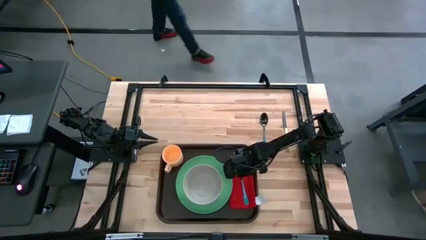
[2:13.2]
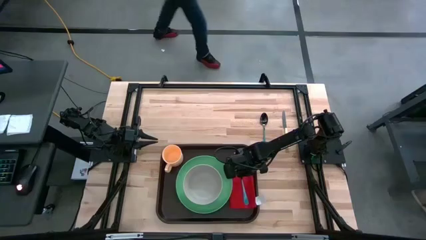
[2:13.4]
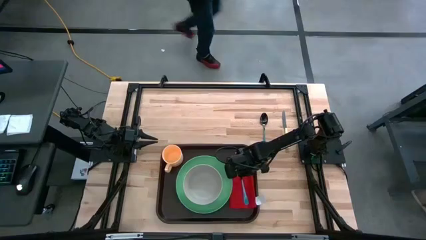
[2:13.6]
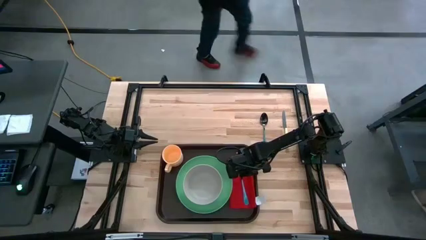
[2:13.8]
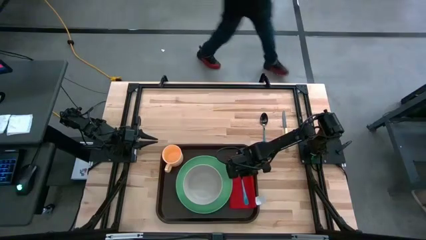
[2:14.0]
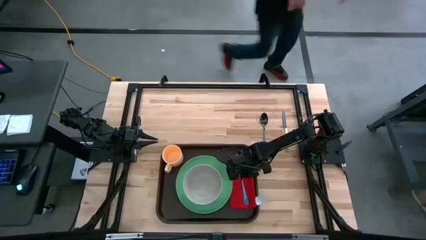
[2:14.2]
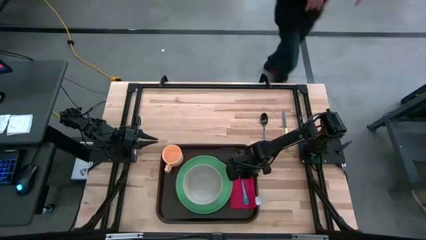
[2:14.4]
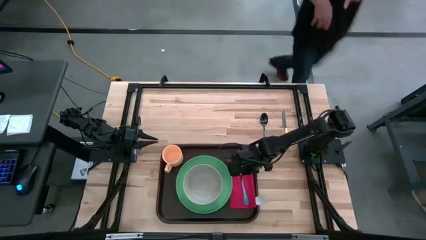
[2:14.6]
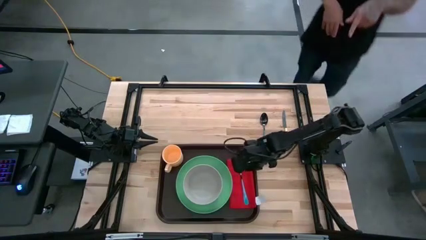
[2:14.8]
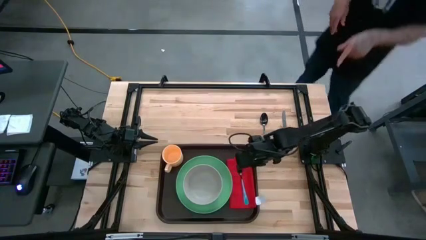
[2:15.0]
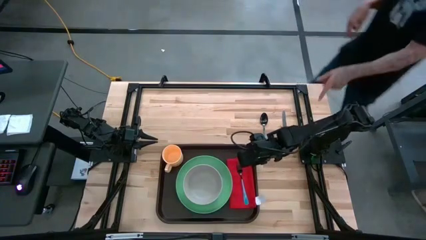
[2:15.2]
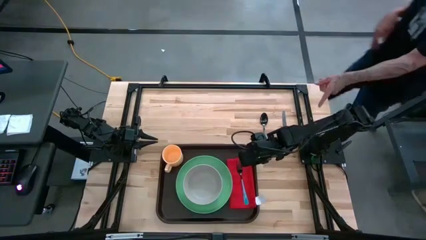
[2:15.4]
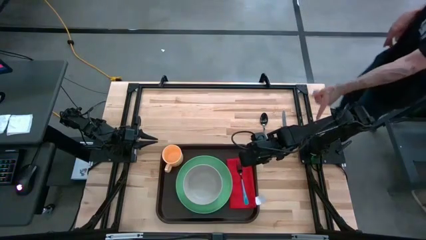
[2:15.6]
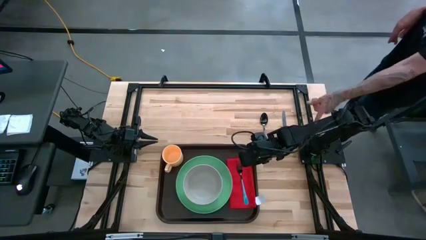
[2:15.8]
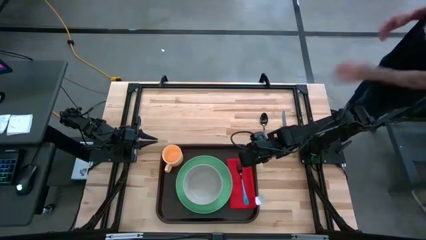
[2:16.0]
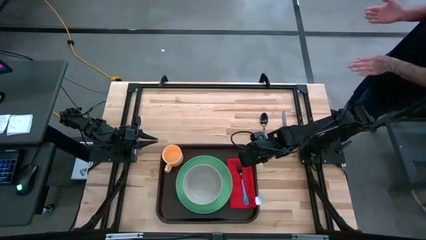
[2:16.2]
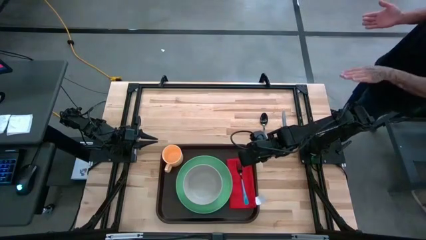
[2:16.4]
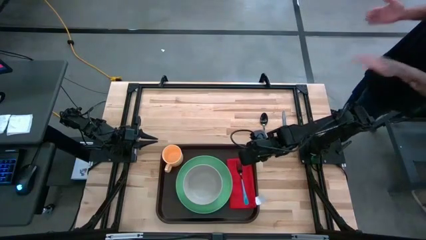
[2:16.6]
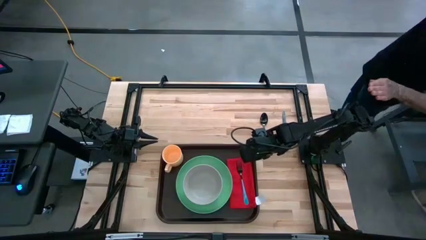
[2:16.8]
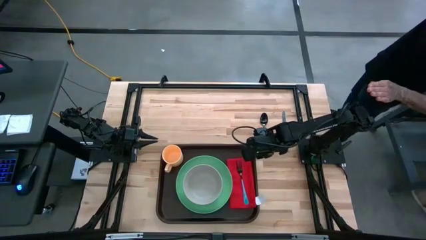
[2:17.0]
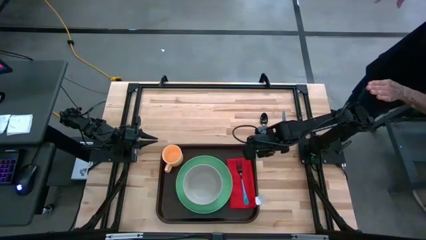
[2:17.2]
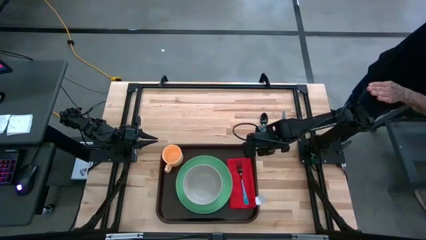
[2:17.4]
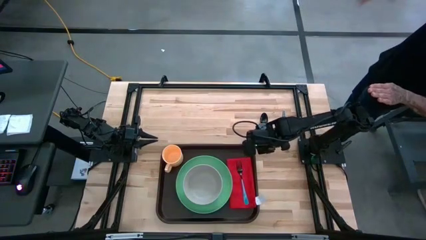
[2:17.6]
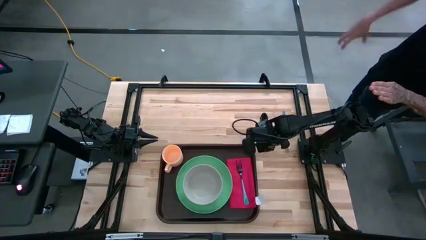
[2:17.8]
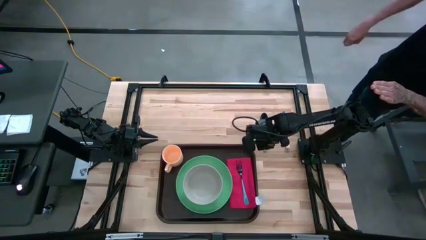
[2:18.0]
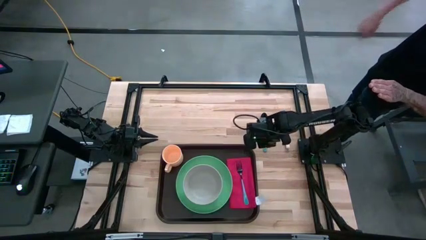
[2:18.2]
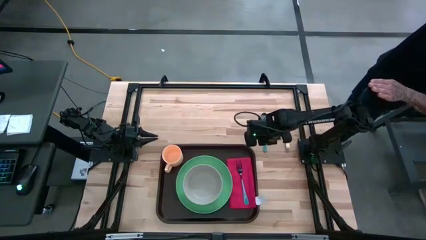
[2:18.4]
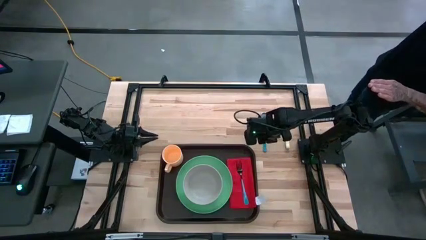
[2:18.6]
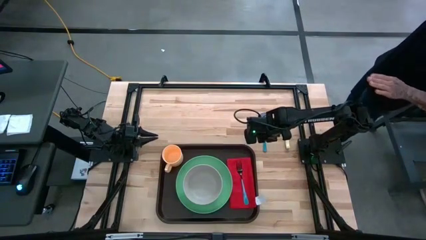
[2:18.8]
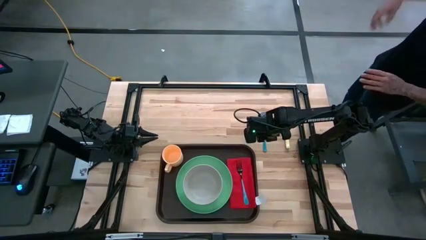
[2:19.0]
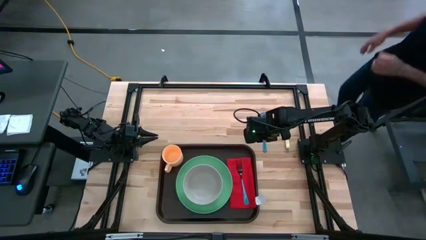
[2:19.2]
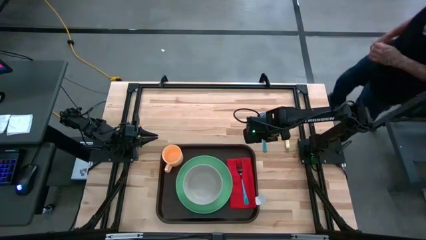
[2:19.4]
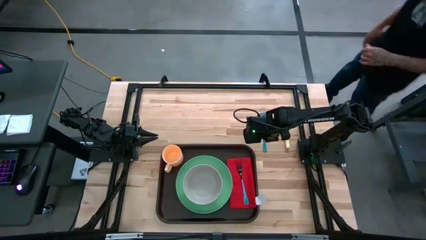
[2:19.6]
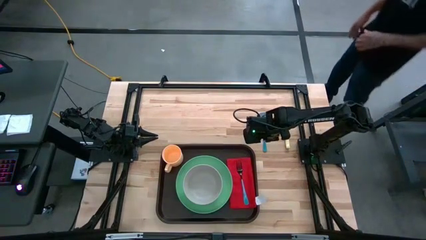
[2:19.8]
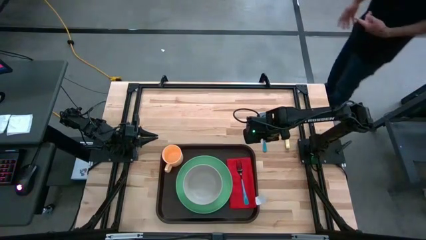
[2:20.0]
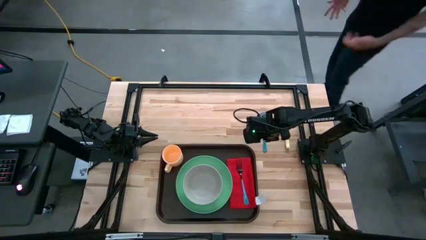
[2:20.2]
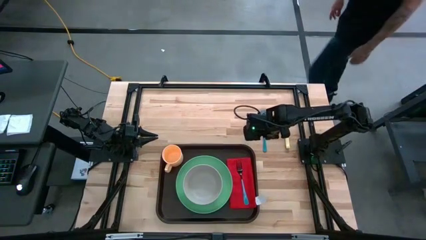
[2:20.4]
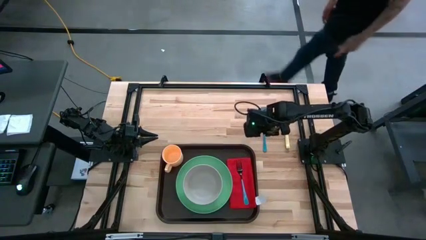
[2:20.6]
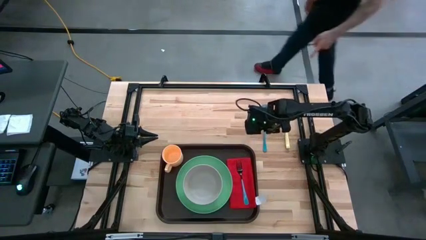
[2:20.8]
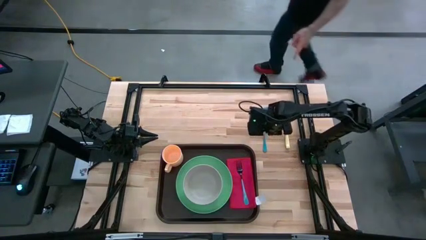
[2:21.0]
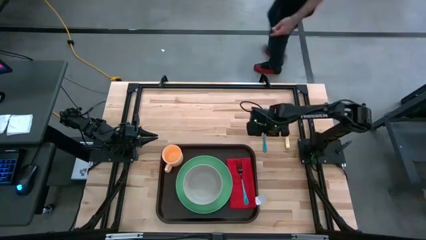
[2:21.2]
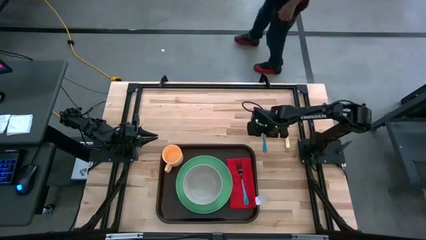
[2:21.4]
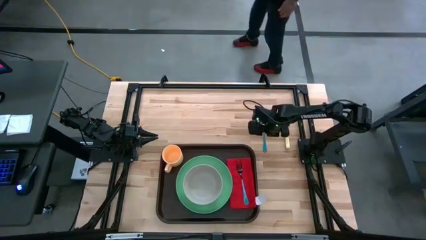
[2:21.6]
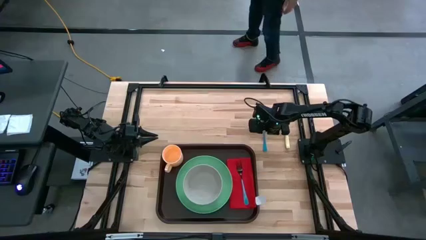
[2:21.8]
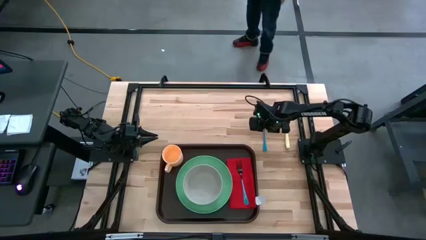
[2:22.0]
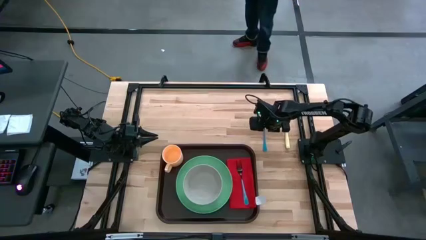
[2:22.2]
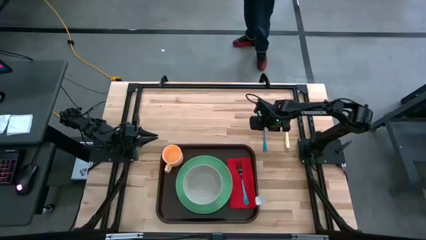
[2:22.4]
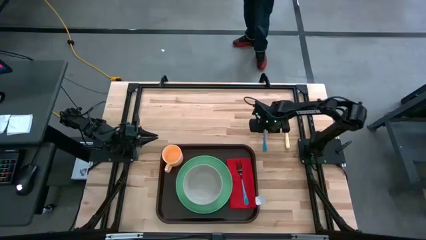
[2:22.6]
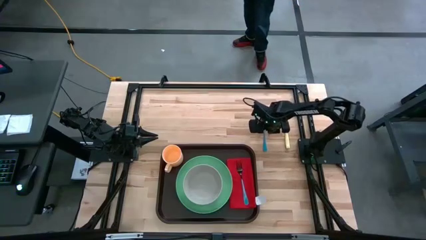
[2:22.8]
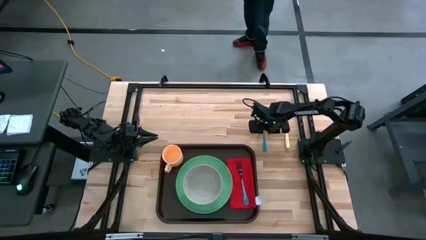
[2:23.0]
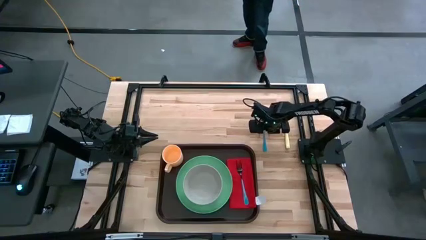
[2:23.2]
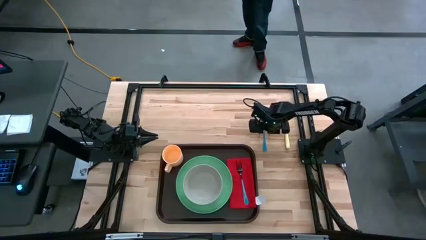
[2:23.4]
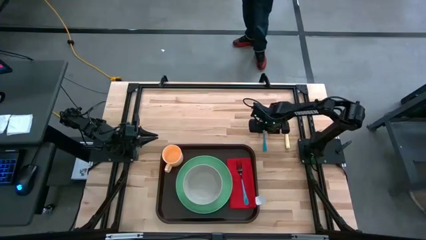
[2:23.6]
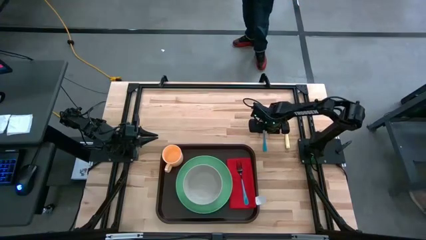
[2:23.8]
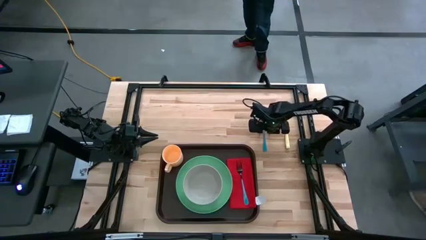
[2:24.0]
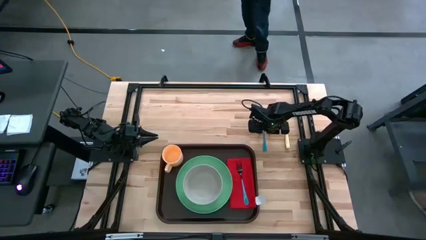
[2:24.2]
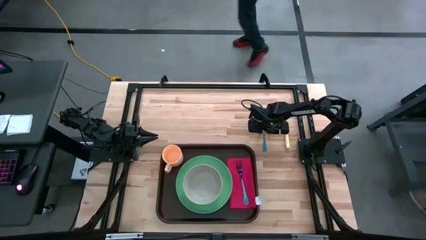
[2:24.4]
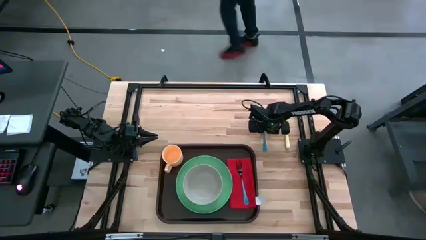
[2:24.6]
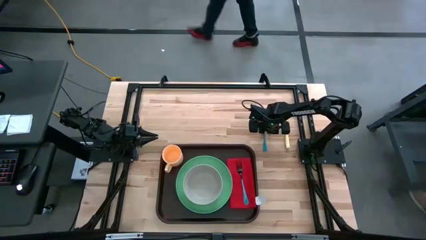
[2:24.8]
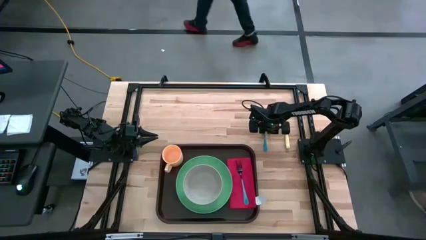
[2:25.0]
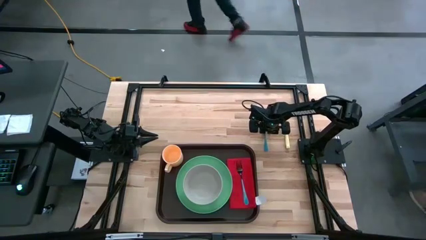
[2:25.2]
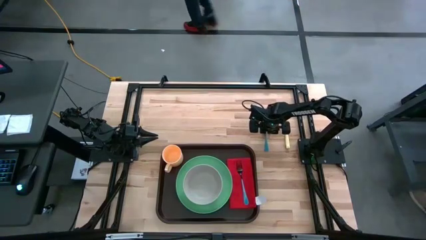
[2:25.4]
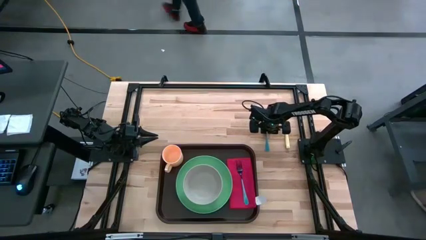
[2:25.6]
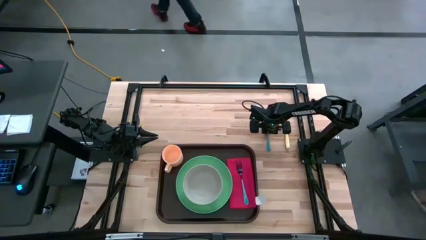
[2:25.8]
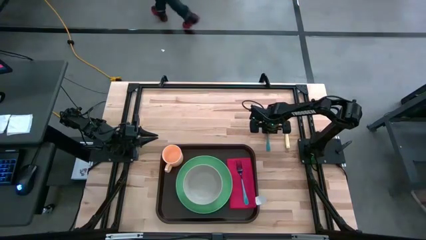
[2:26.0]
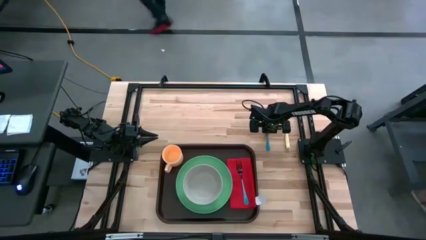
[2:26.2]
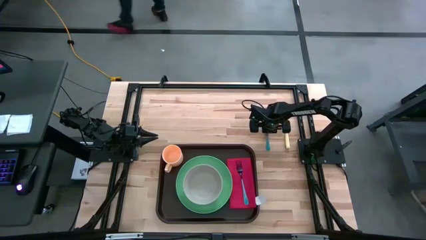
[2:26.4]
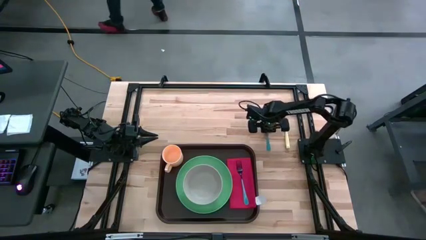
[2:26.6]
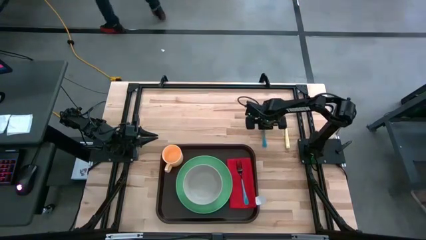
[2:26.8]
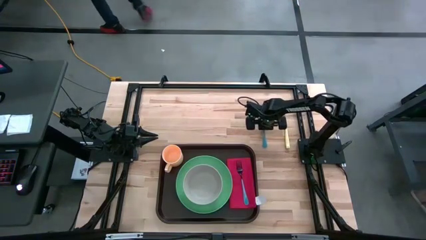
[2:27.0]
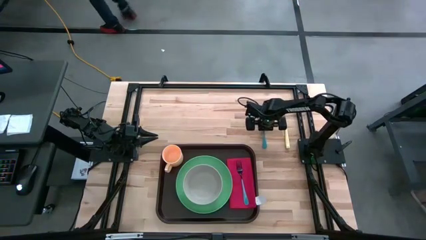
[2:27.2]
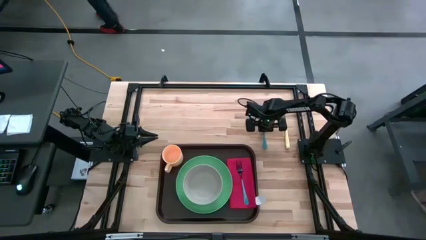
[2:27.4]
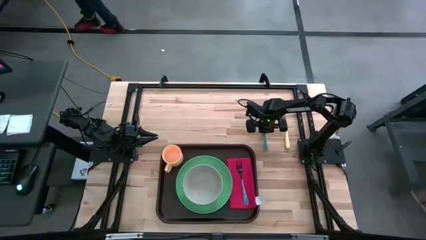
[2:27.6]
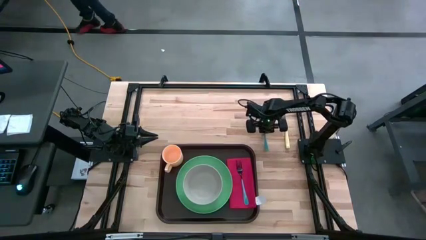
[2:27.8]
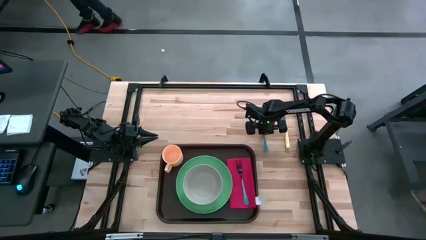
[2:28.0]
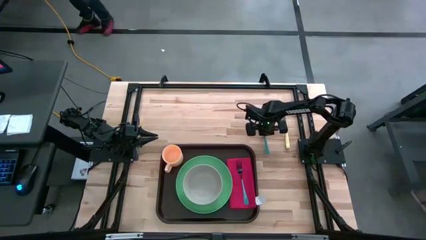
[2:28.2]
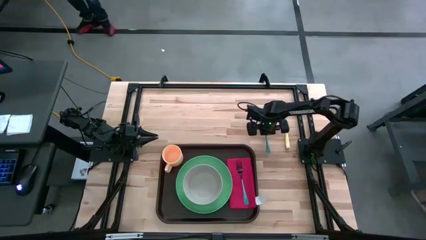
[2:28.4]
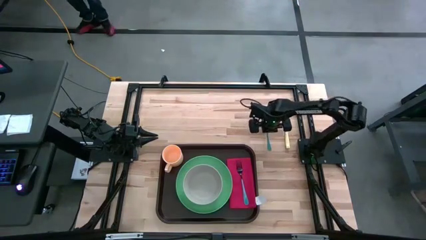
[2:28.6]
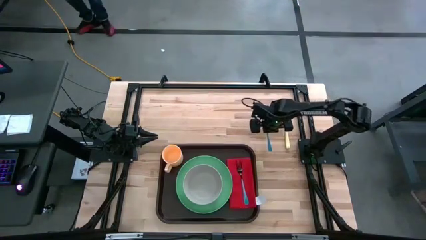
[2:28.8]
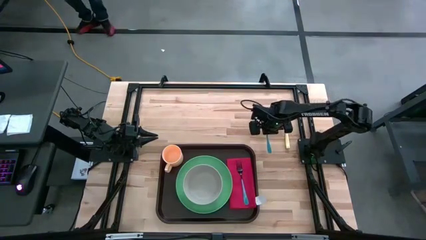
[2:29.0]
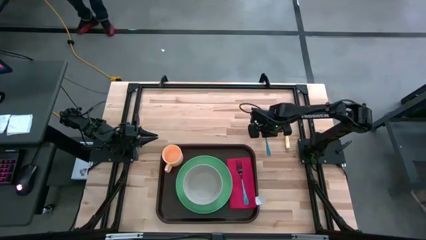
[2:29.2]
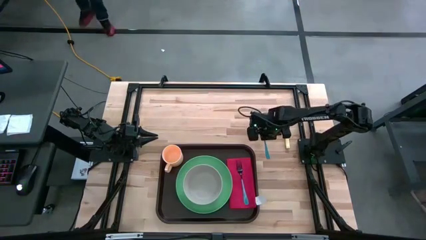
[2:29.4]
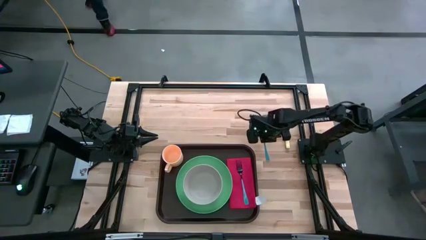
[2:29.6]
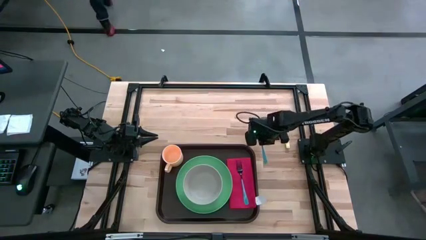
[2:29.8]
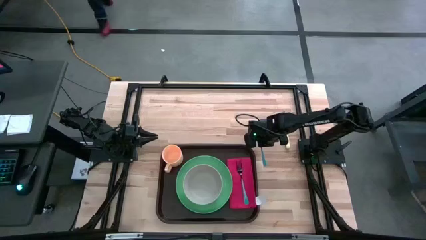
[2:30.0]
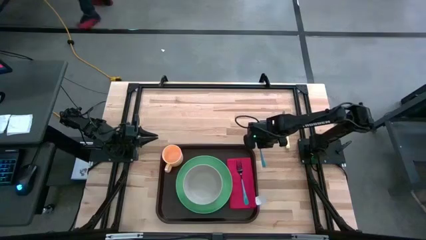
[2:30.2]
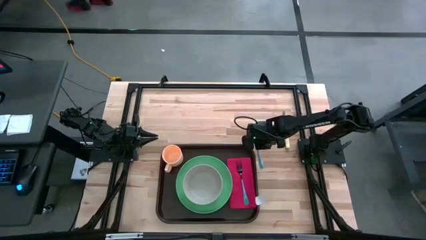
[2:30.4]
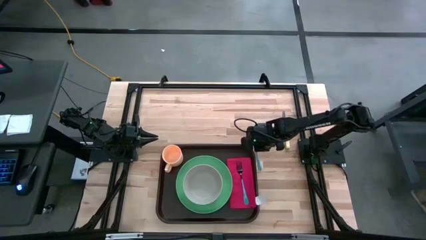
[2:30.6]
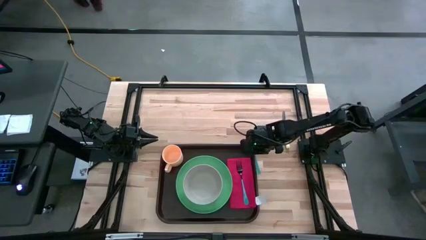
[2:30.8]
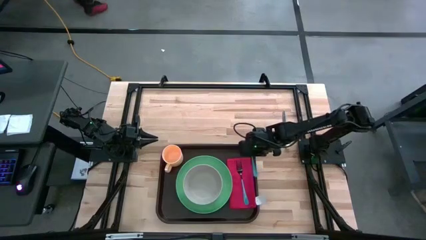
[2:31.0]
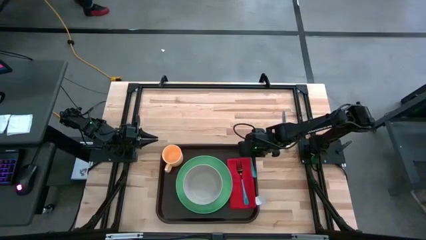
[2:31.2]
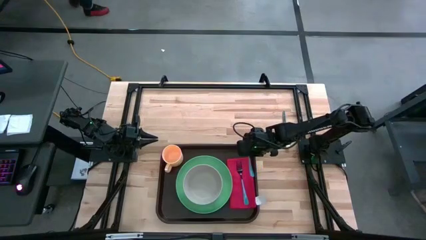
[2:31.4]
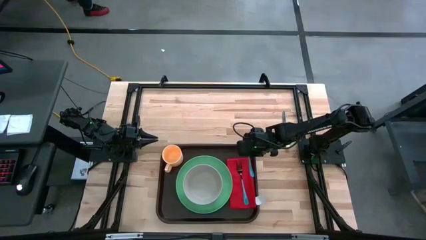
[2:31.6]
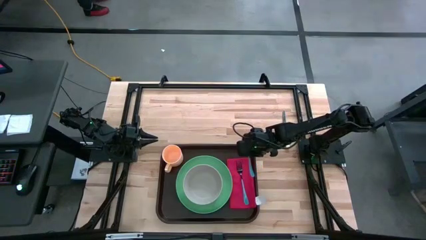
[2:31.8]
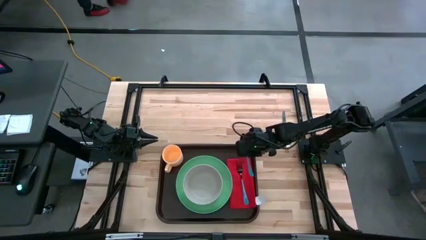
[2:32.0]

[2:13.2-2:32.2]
Task: Set up tray
Put the spoon on the table napkin to the left of the fork on the serving tray
